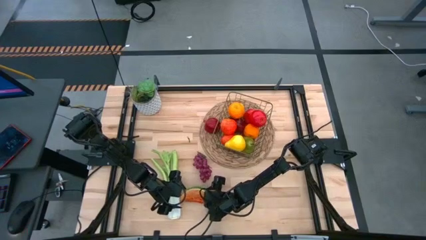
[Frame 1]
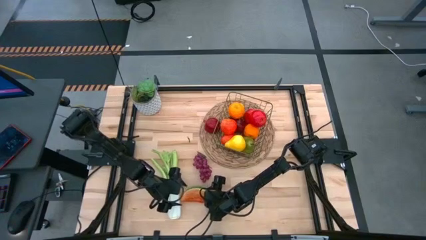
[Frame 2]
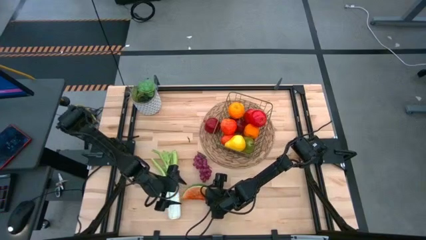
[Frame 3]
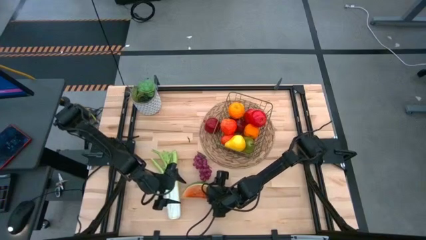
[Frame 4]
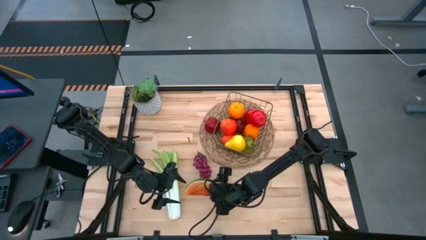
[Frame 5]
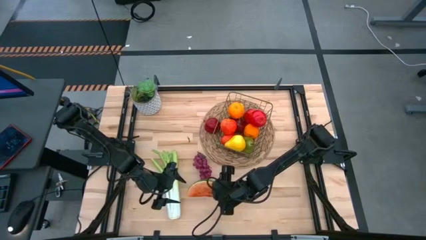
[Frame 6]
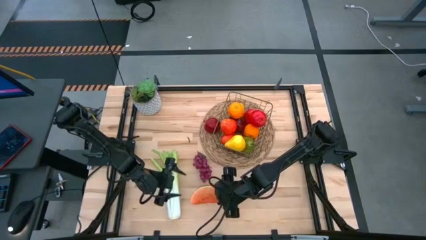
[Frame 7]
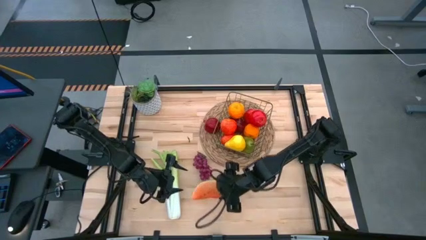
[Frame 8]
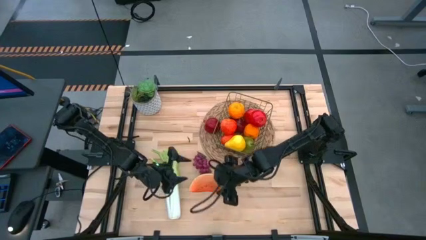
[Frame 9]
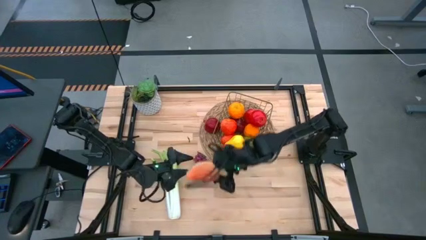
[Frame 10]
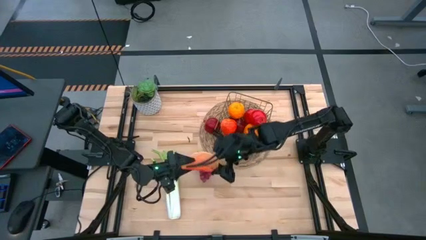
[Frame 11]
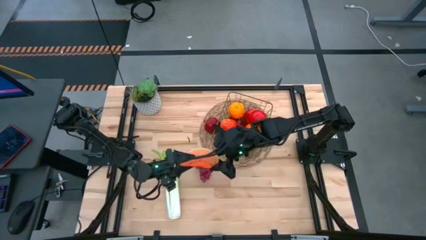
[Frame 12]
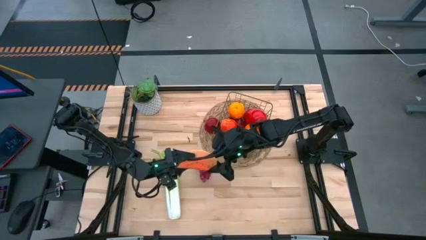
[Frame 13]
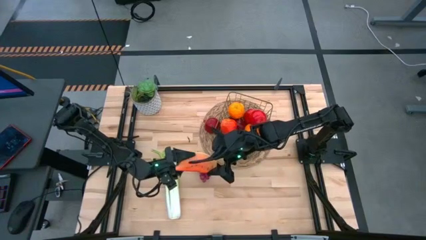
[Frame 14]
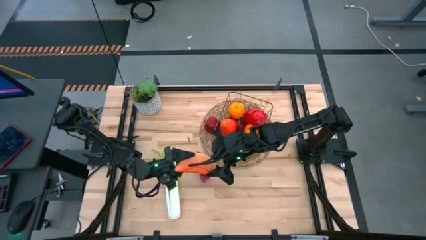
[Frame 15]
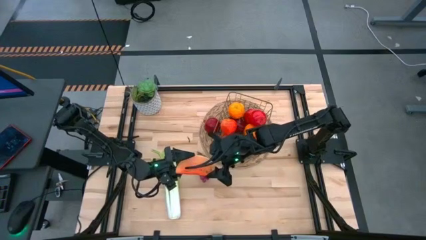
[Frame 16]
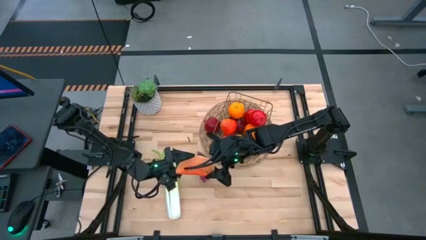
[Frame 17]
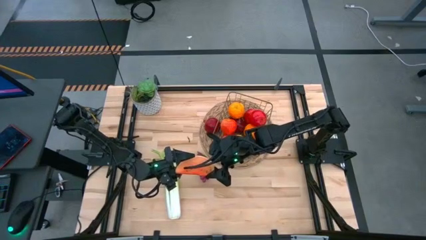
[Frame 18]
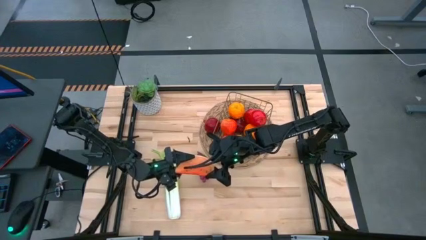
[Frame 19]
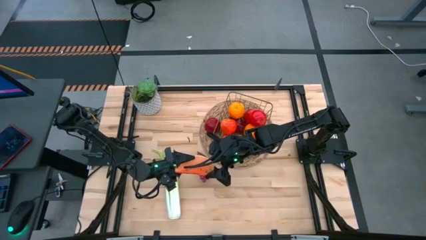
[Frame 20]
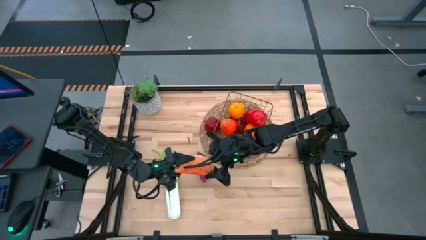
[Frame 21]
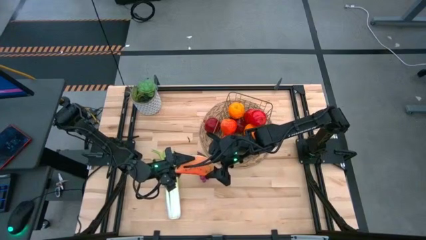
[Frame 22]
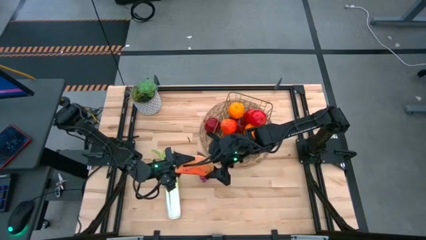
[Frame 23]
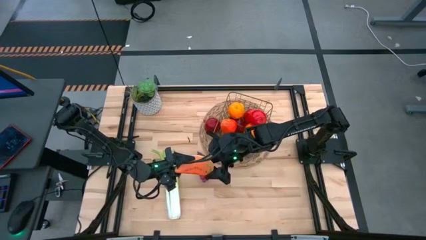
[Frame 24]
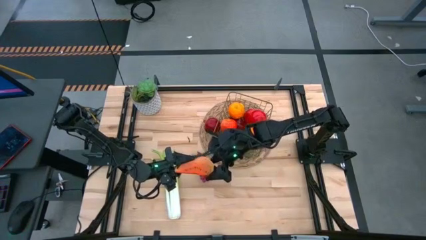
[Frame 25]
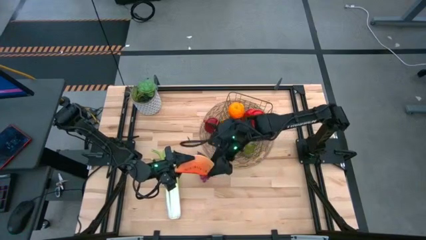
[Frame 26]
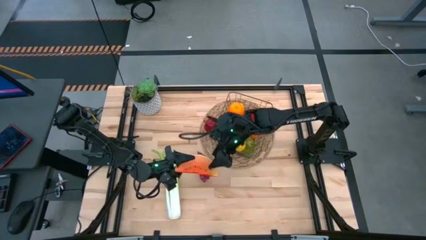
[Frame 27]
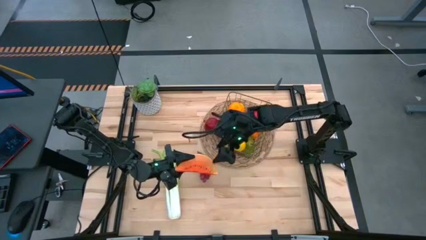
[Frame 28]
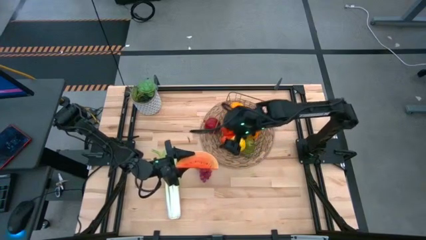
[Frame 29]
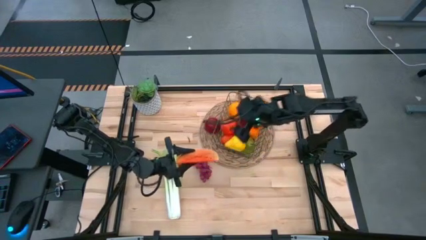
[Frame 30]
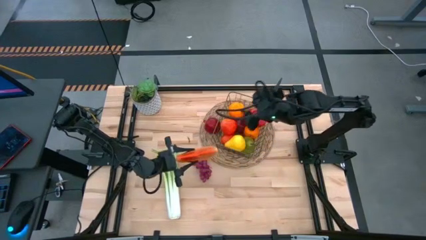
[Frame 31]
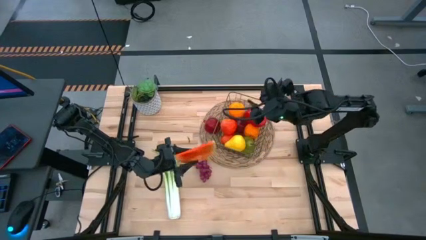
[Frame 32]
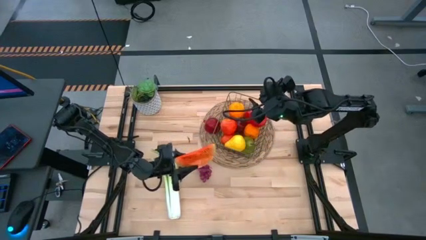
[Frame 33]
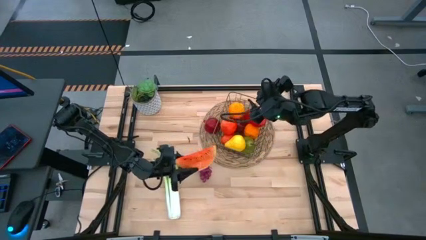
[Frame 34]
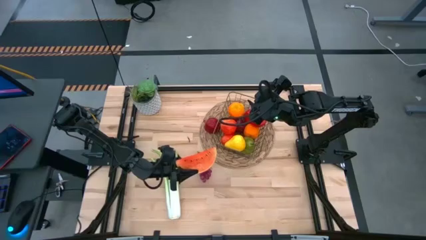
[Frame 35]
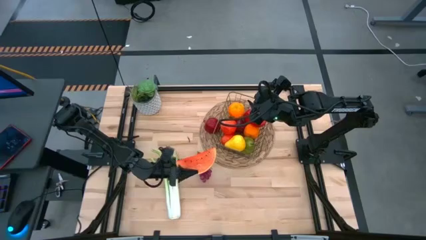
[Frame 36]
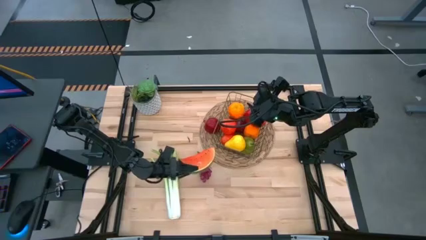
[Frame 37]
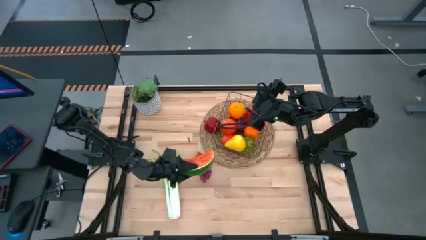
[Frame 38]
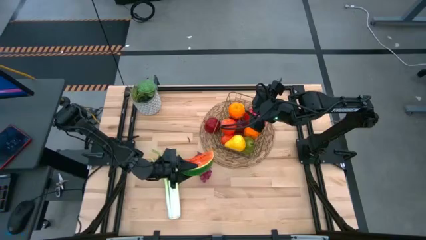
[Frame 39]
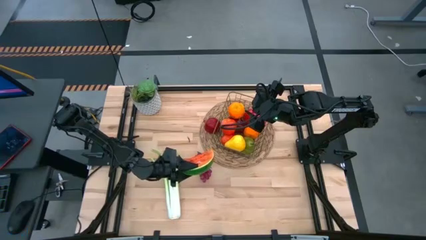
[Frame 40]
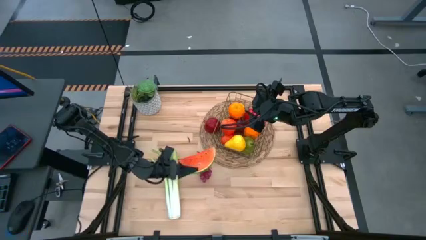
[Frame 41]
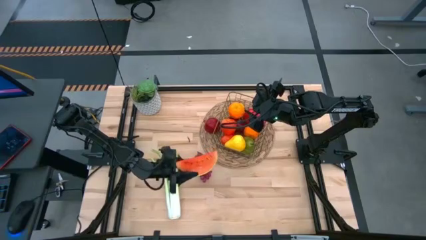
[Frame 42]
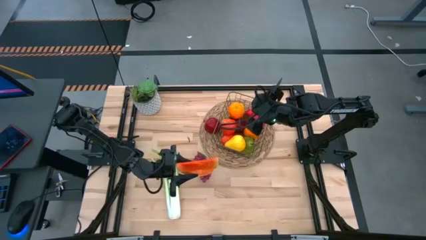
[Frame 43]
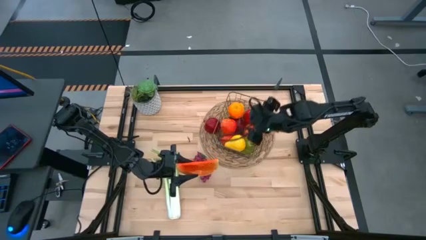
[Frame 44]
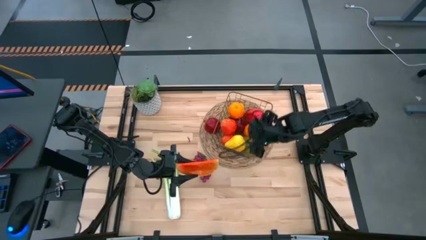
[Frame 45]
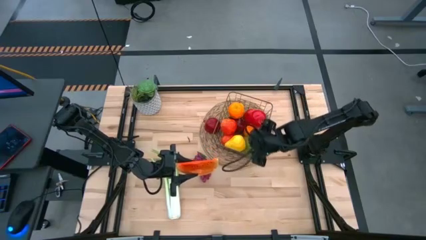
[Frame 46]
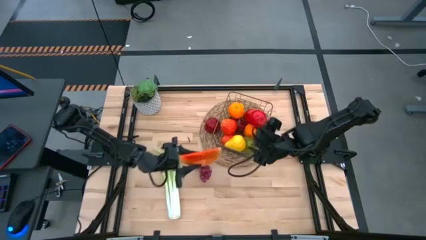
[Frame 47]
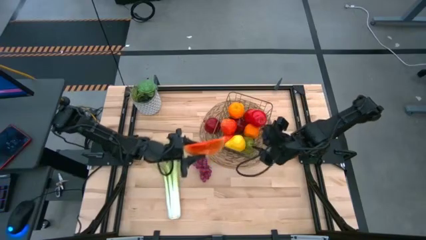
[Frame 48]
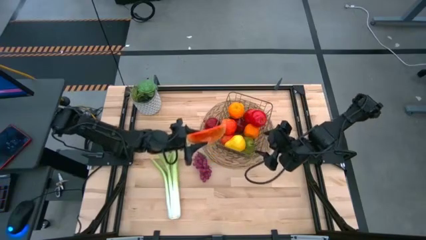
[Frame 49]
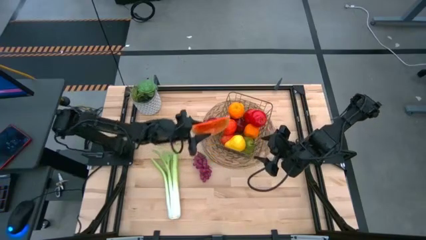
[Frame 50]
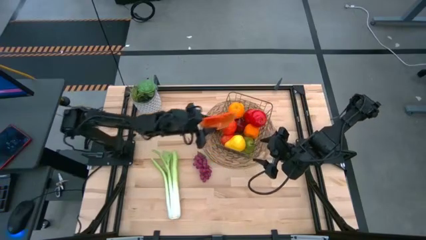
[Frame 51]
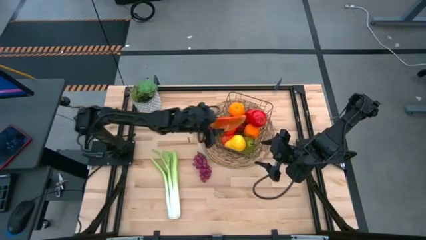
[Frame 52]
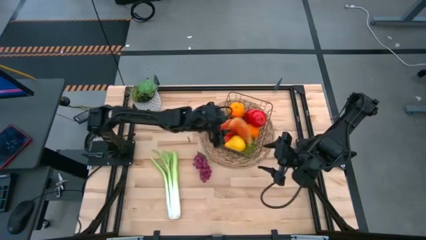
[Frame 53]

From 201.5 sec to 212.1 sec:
Task: Build produce basket
Put the red watermelon into the gold wire basket

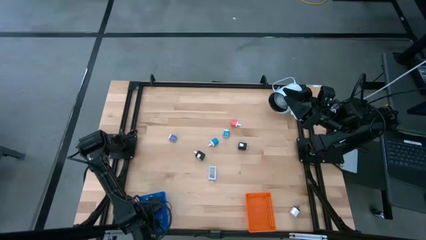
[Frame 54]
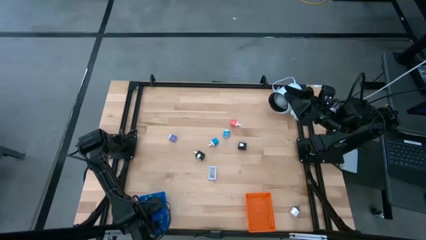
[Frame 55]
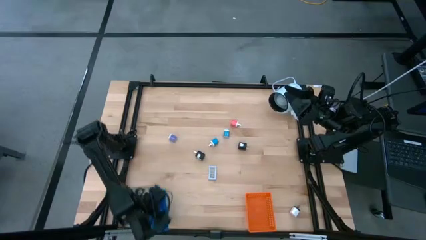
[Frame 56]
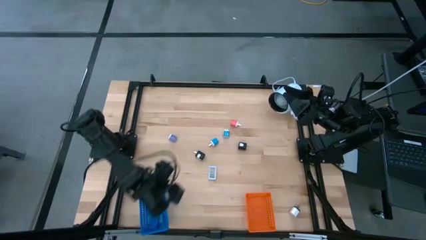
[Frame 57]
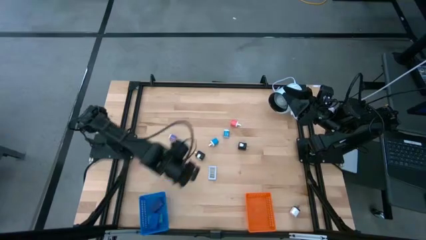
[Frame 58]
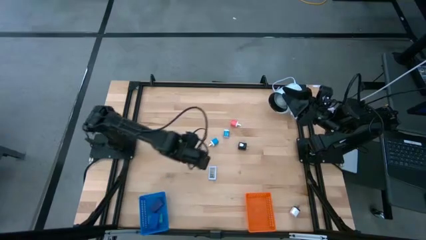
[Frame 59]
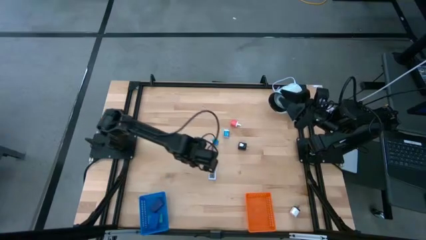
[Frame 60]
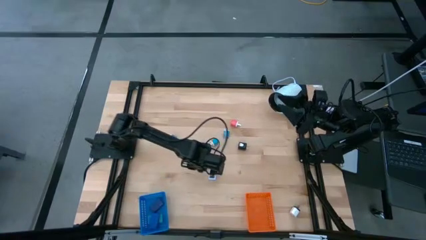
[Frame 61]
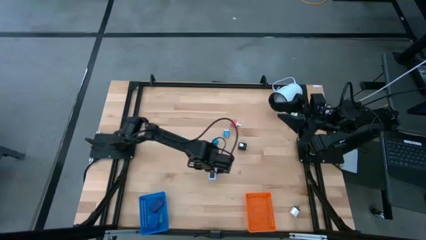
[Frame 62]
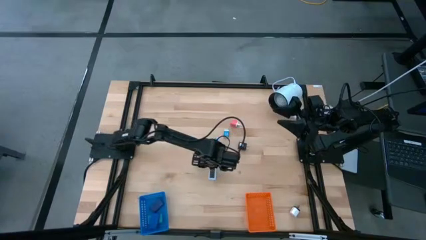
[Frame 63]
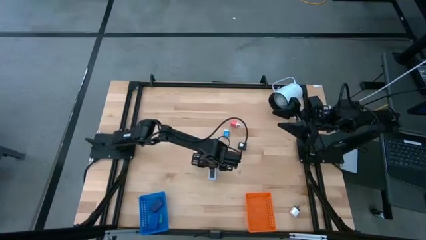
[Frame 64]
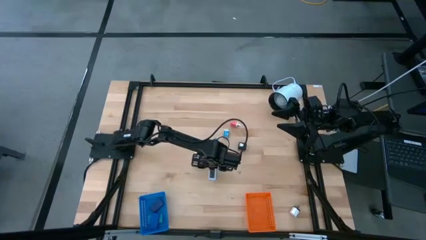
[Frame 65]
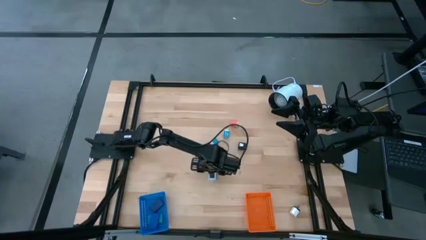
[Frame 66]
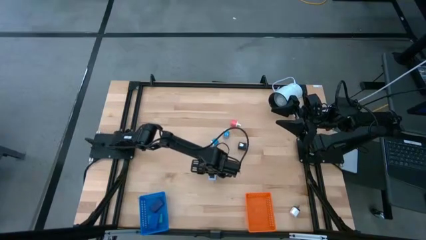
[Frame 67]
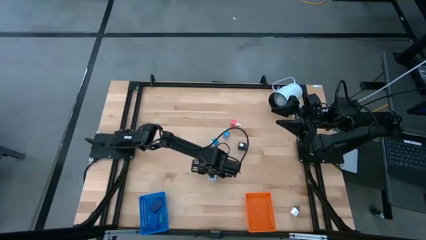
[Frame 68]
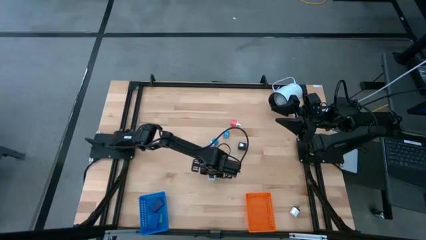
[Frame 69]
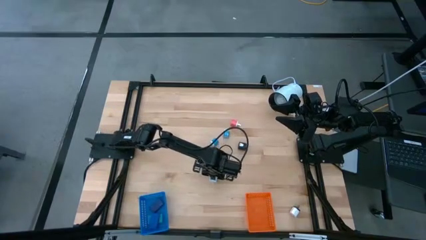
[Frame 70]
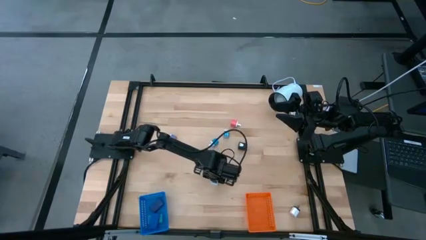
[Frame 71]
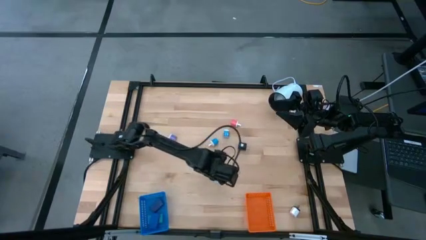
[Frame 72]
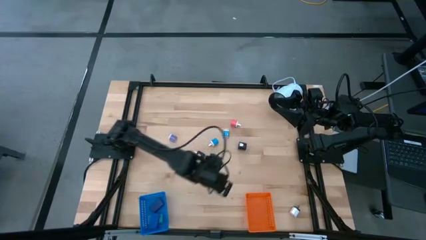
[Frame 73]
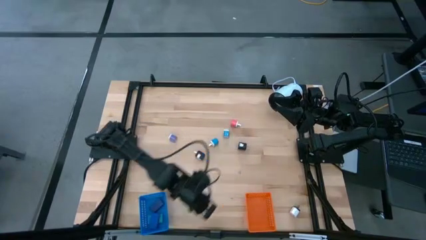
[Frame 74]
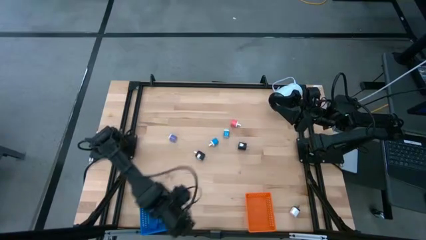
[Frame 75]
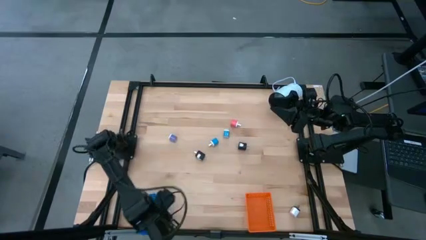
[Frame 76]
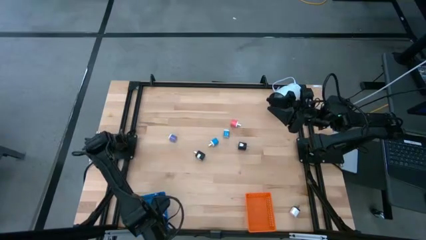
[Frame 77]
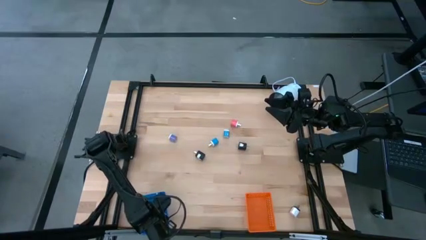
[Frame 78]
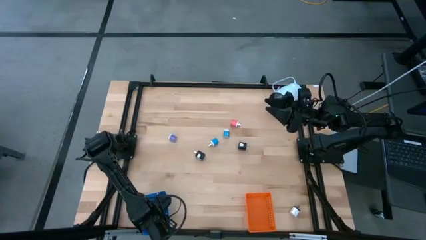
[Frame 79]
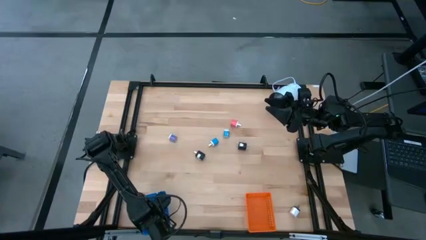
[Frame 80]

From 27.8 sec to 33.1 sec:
Task: Pick & Place Office items
Put the white digital clock into the blue bin

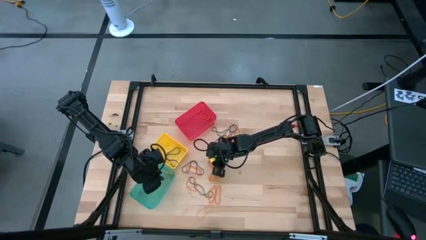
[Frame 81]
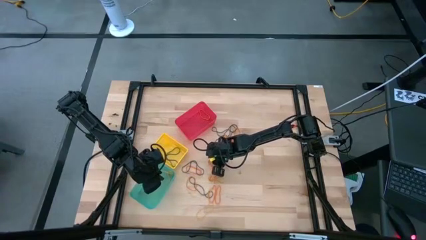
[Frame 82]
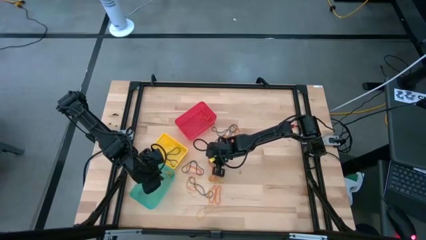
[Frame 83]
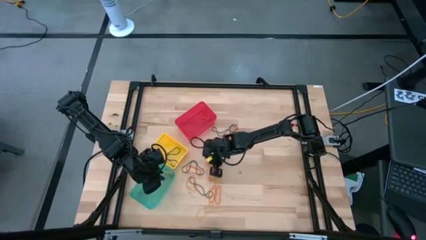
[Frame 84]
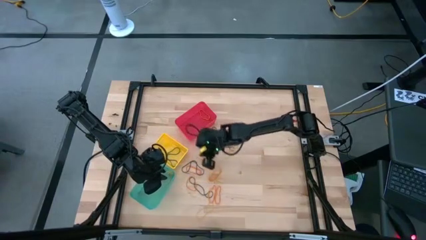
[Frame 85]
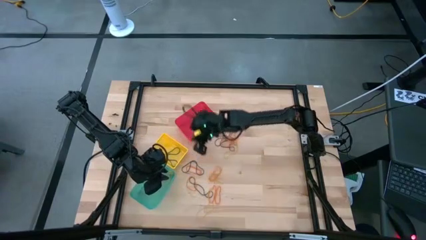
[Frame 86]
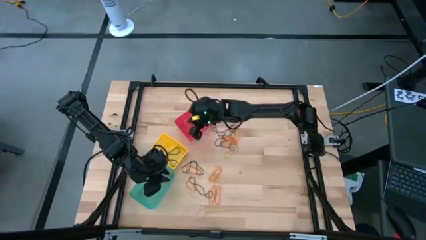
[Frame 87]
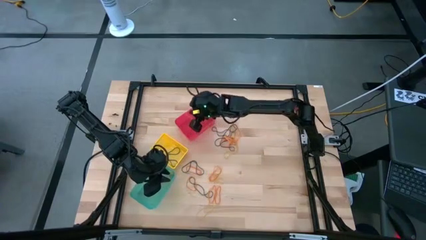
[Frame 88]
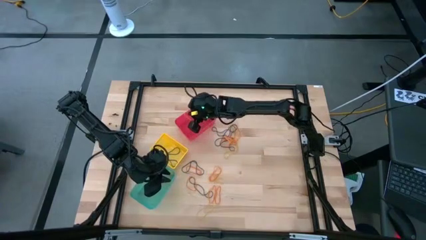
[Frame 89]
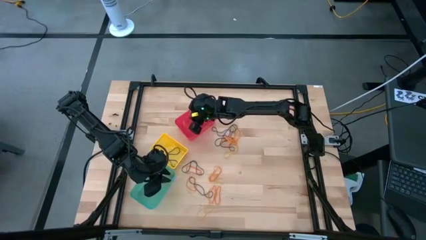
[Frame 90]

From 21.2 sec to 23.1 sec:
Task: Sort rubber bands into baskets
Put the orange rubber band into the red bin
